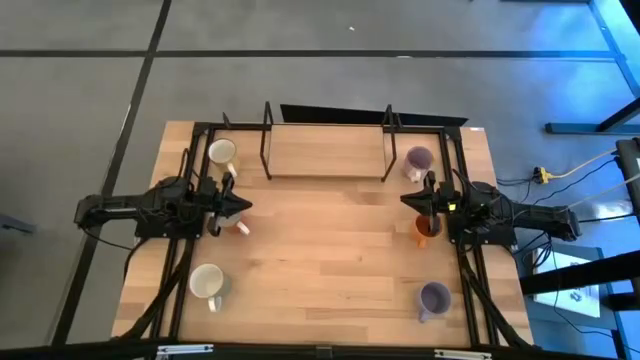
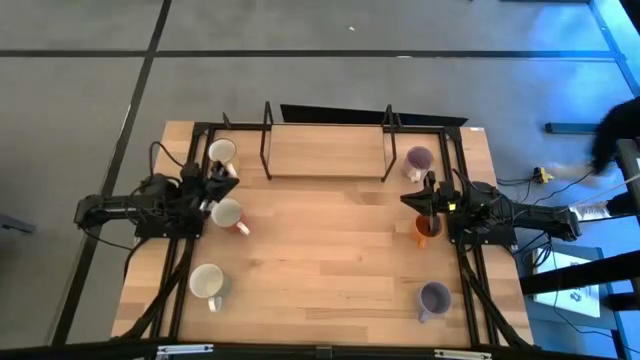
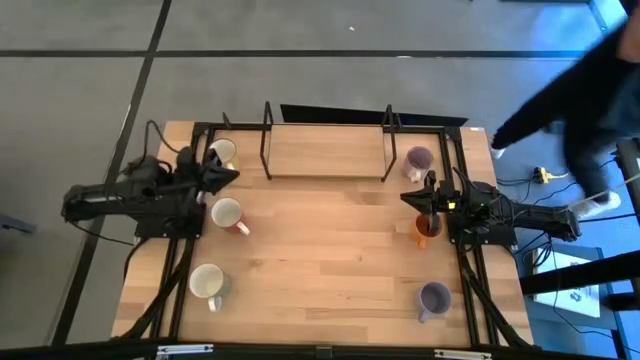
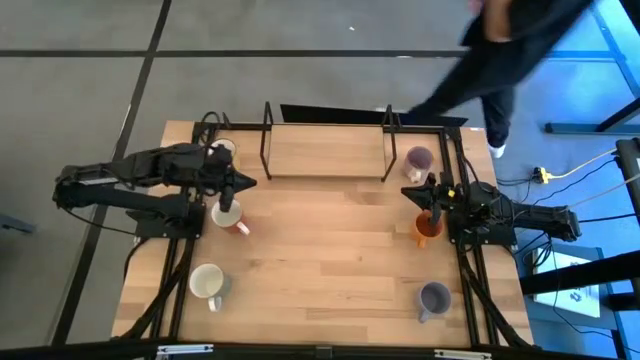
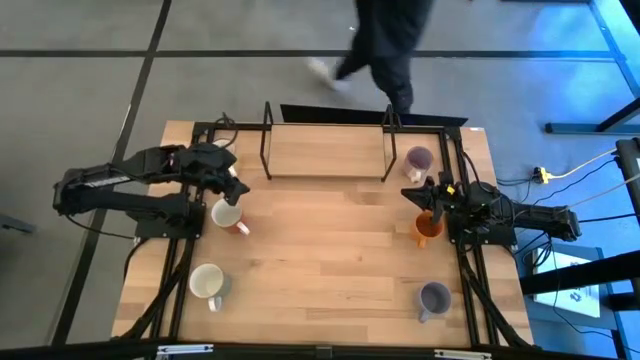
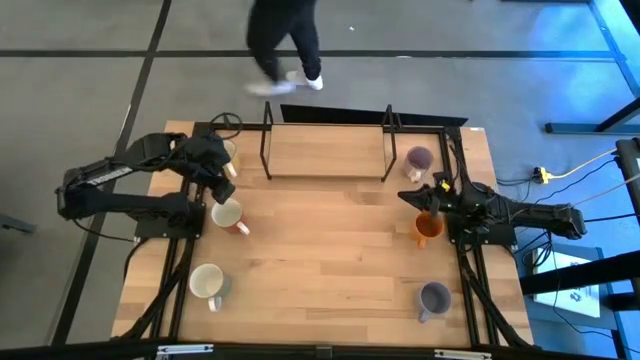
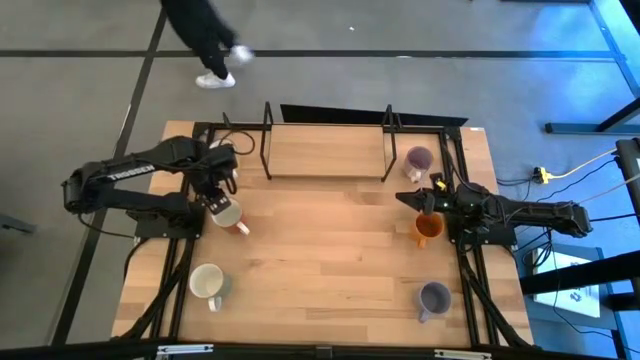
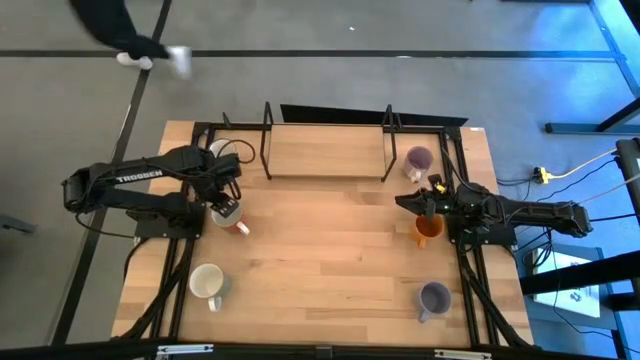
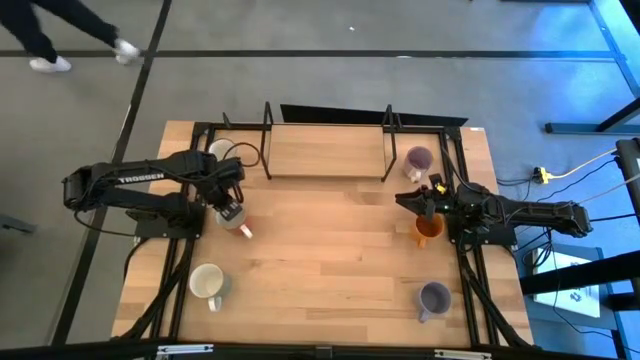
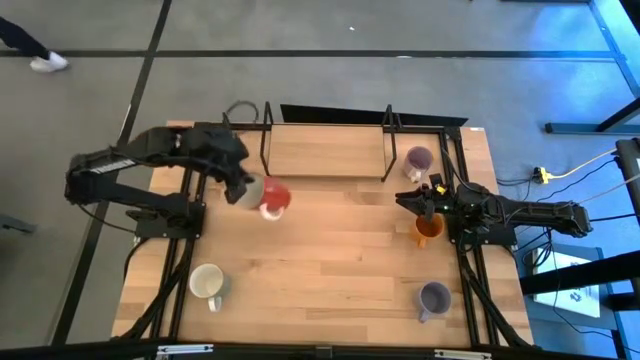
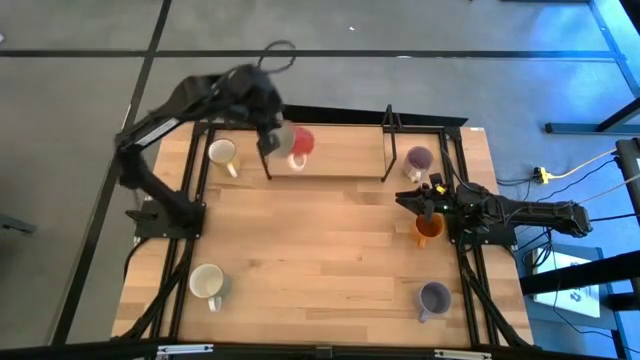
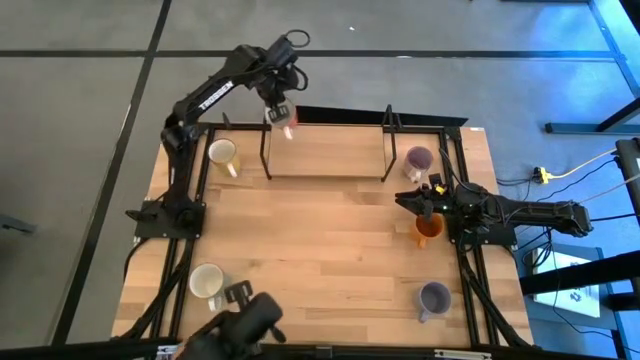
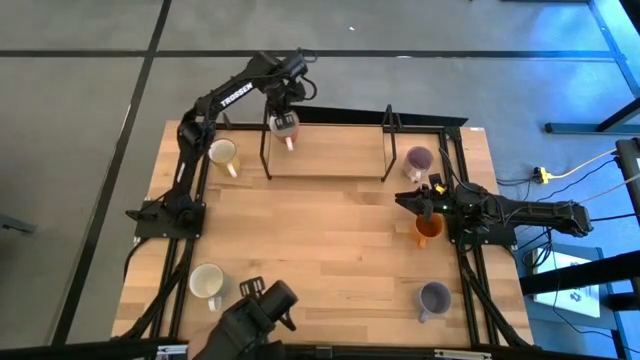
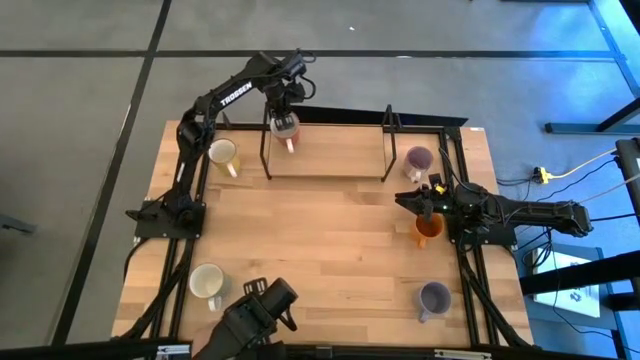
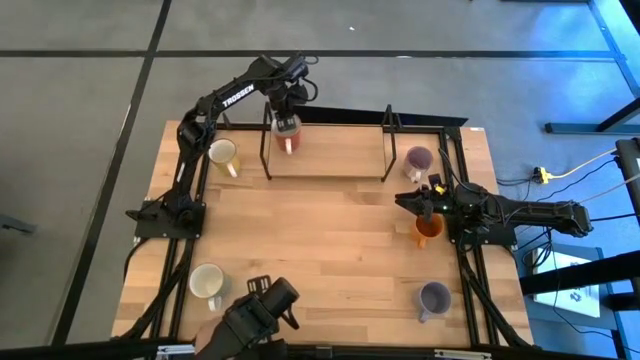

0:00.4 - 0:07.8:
Task: Place coffee mugs
Put the red mug on the shelf

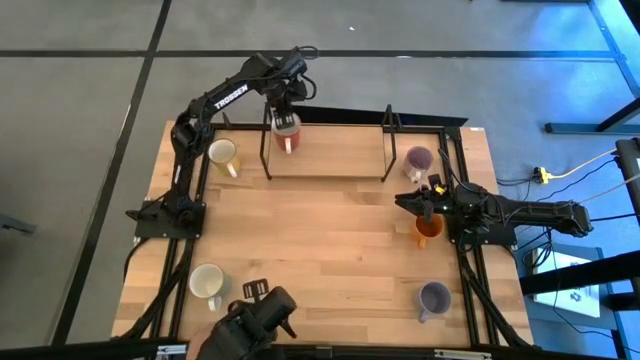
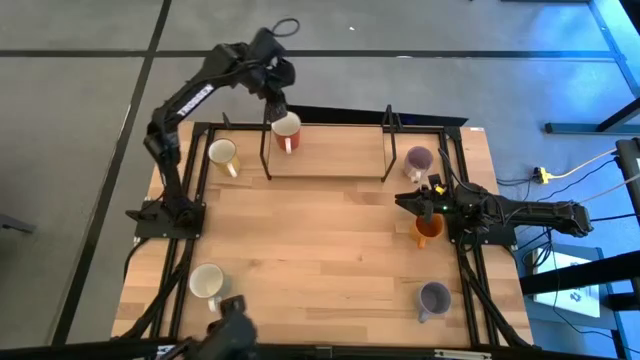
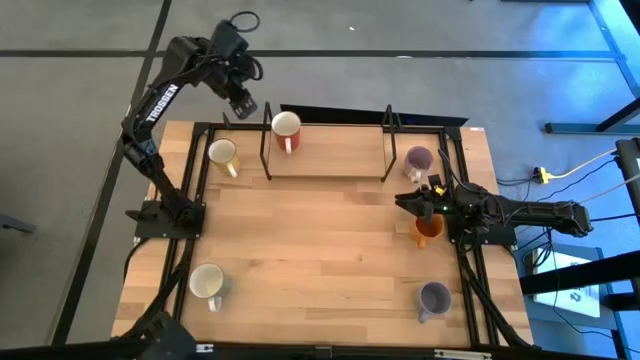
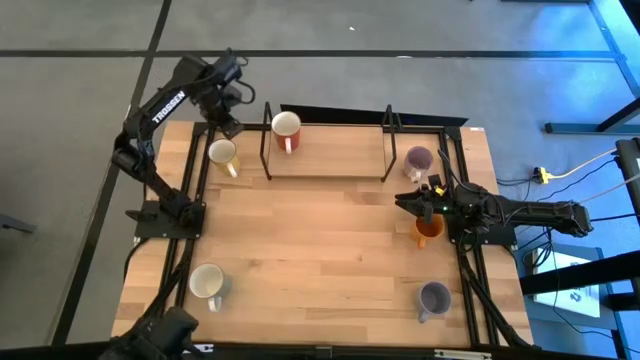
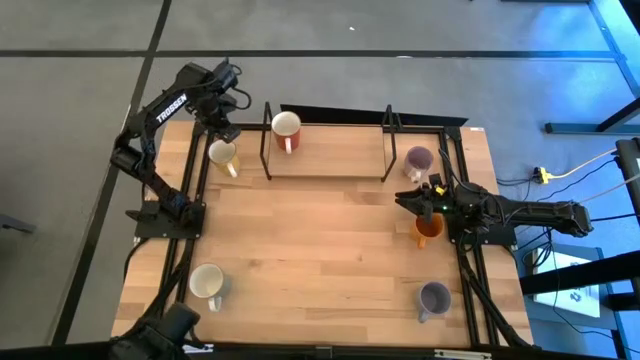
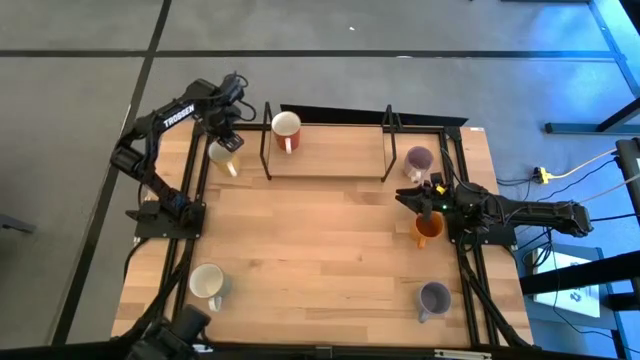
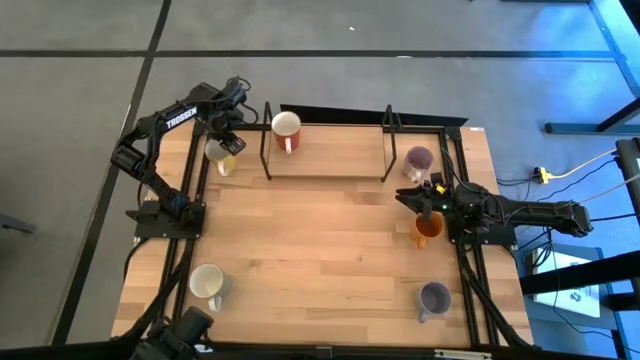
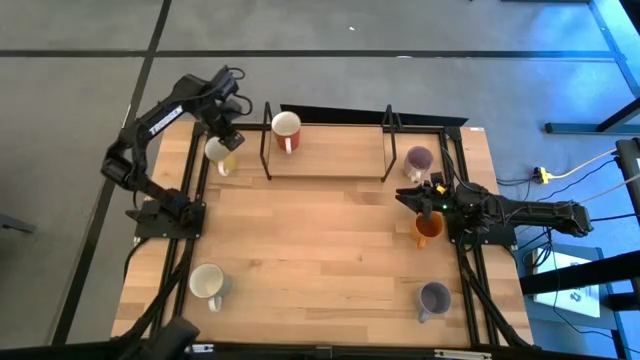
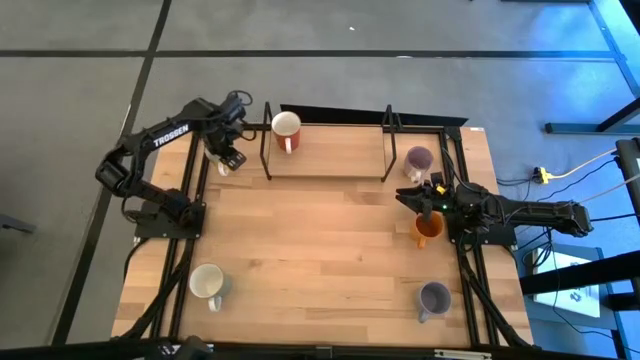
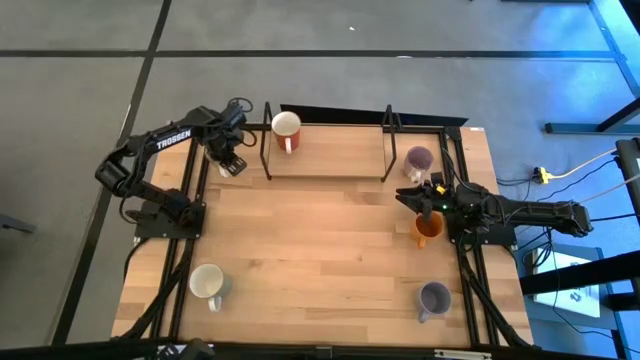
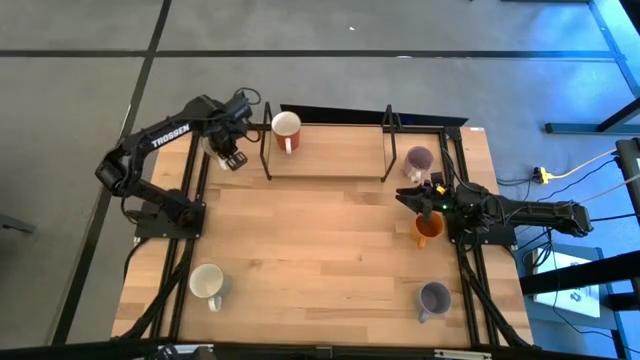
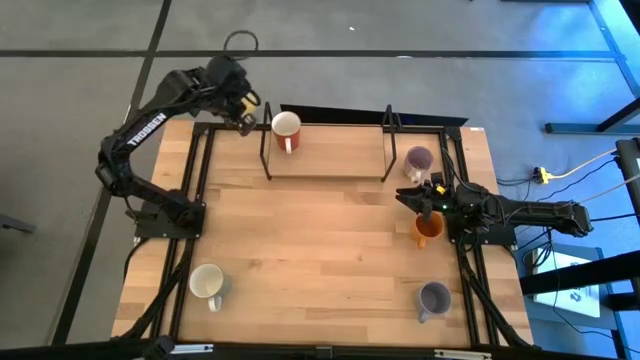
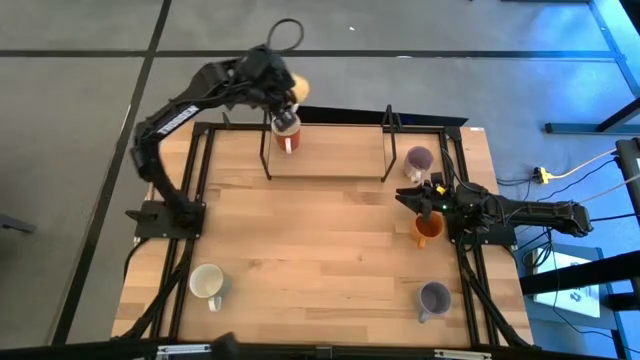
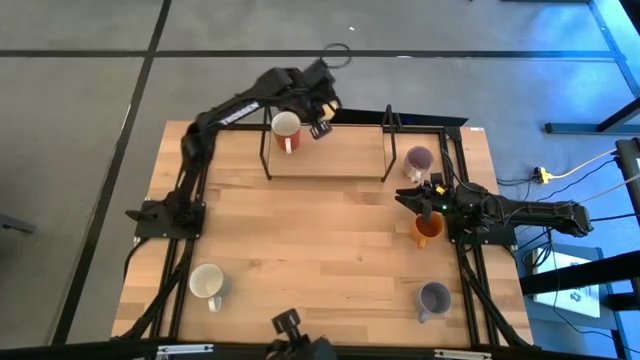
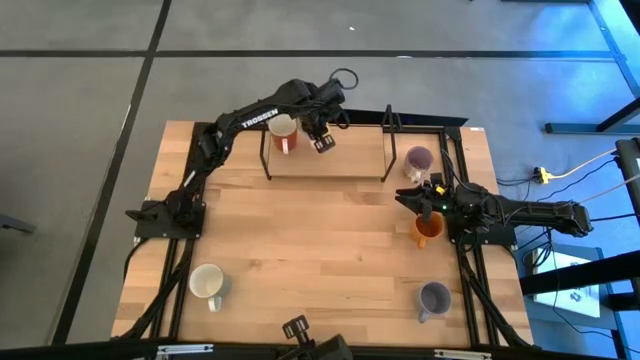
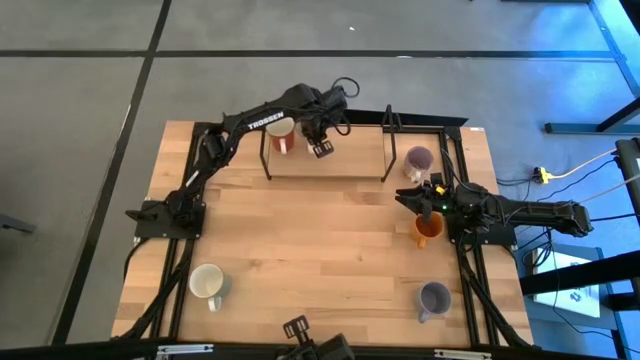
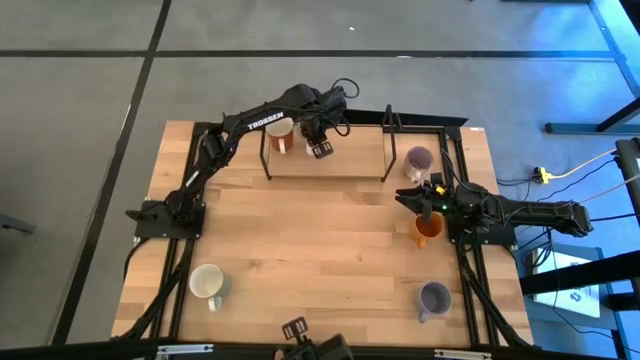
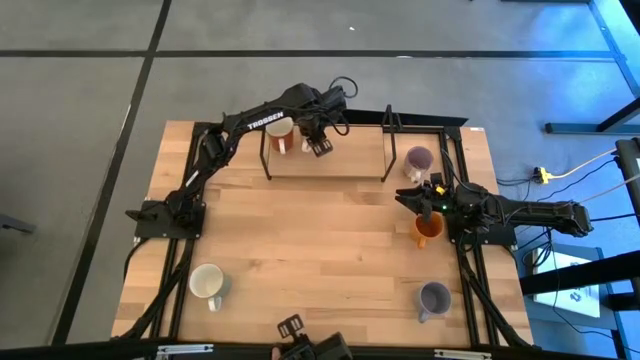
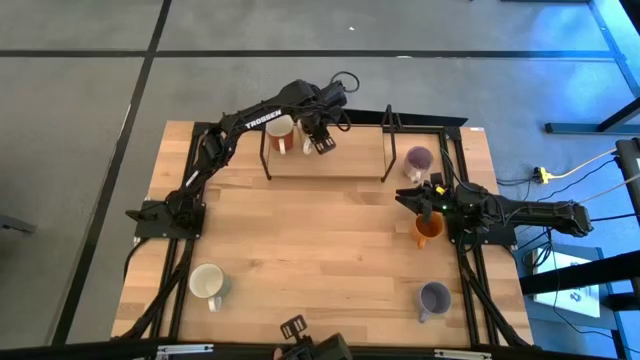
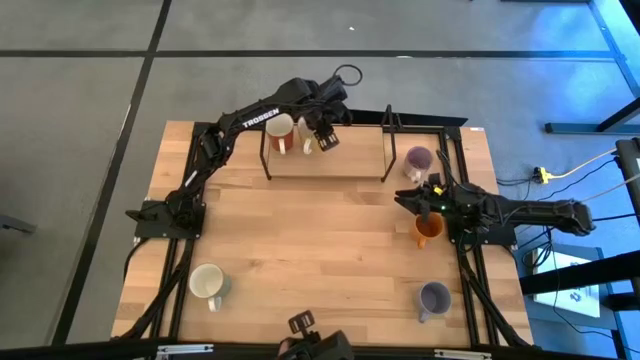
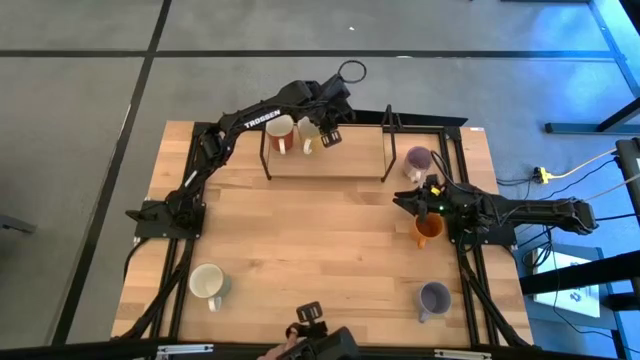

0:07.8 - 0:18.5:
Put the yellow mug on the shelf

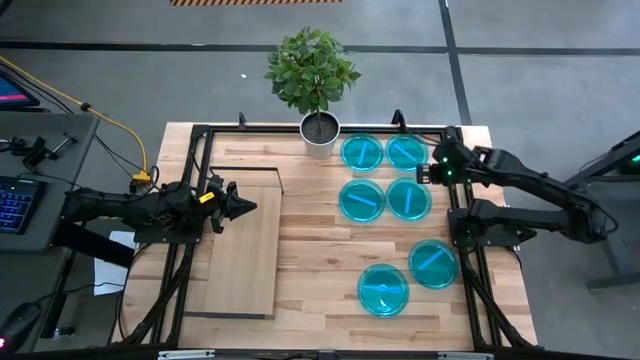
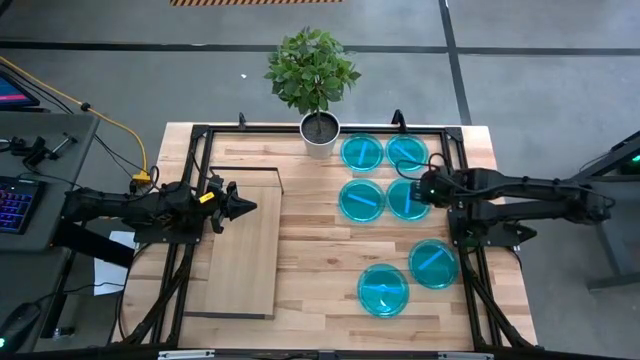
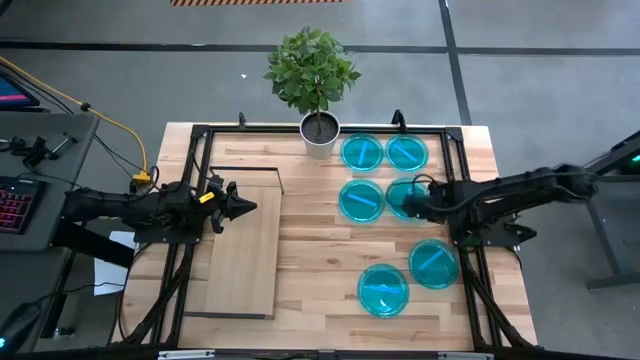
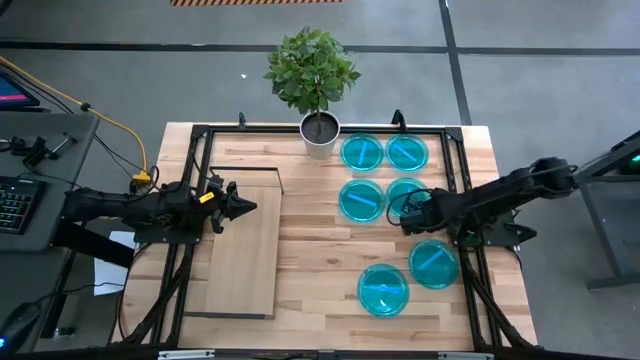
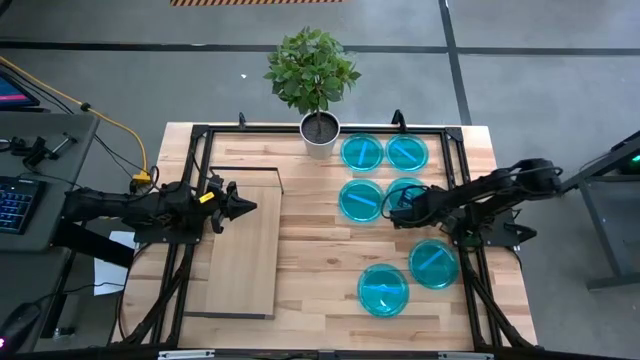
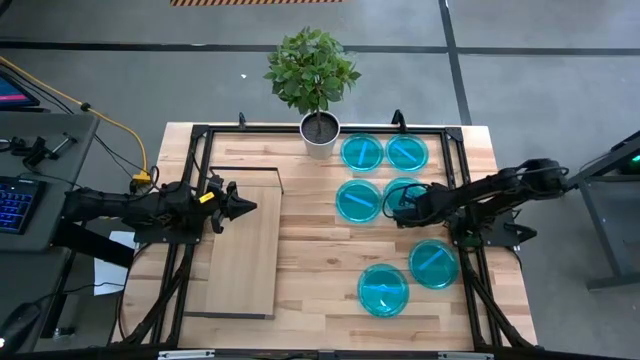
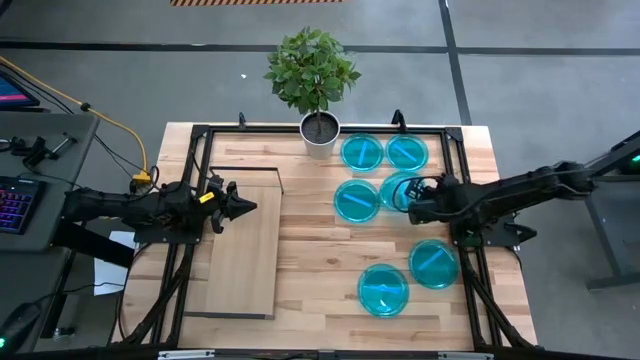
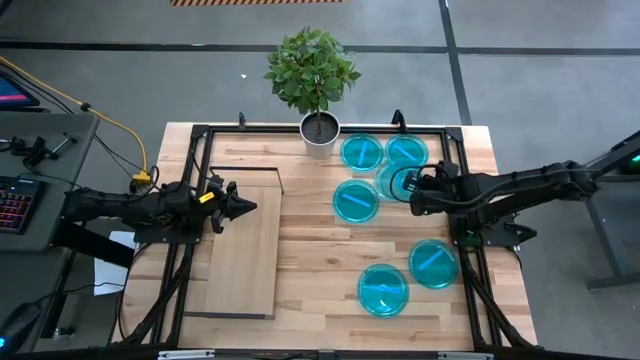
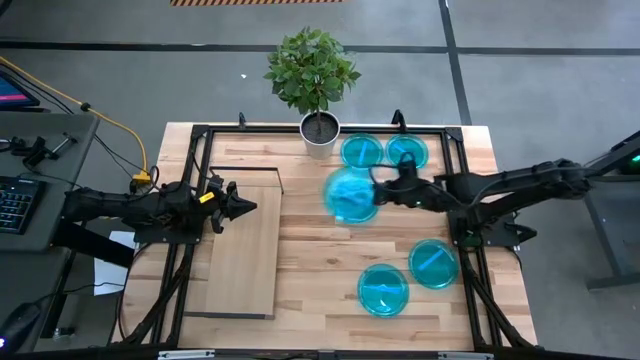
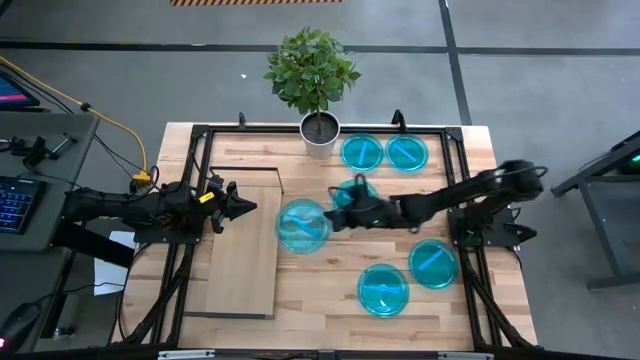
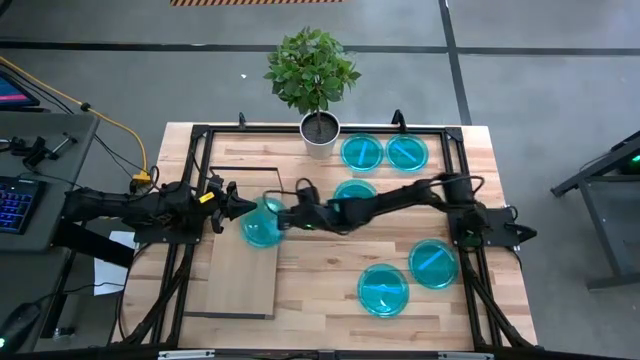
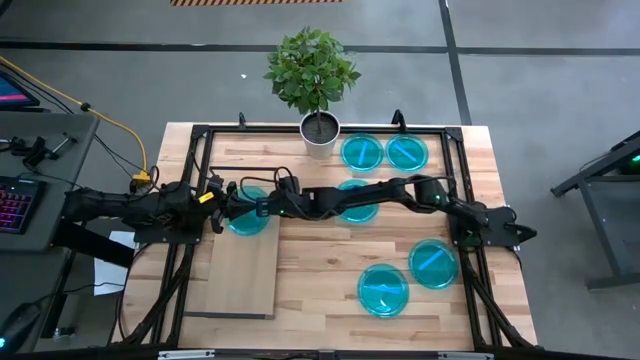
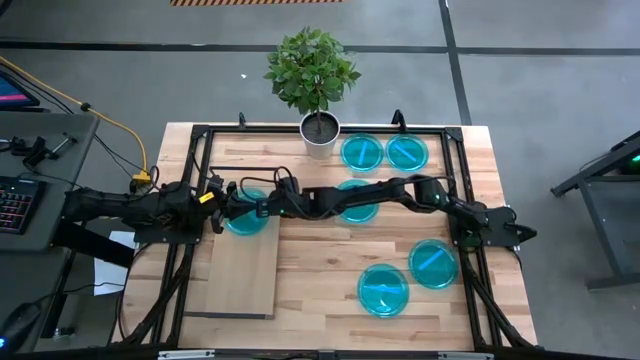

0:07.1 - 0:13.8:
Task: Place and stack plates onto a shelf
Put the middle right blue plate on the shelf
